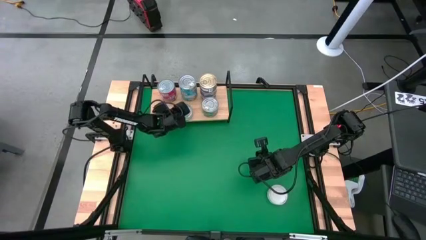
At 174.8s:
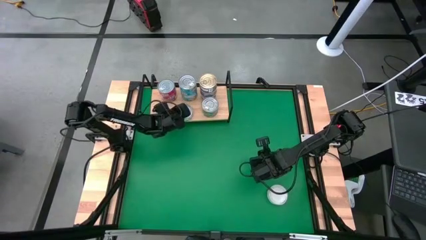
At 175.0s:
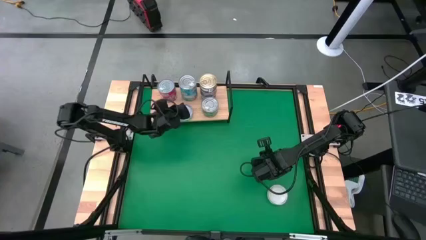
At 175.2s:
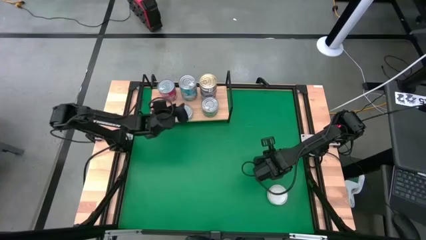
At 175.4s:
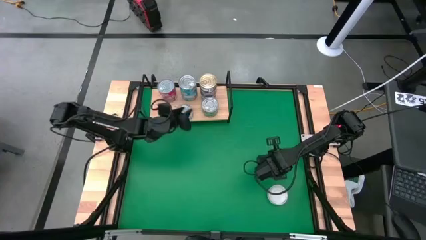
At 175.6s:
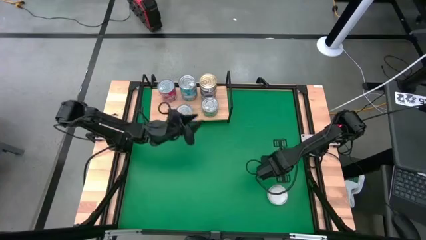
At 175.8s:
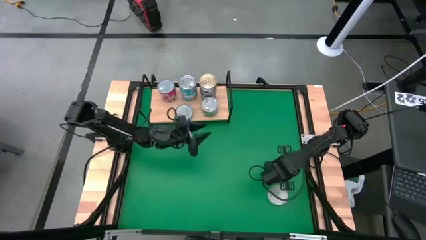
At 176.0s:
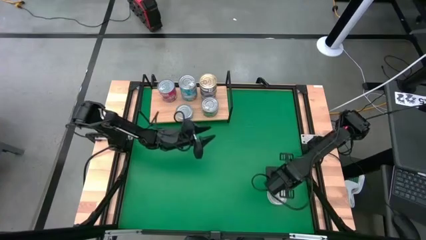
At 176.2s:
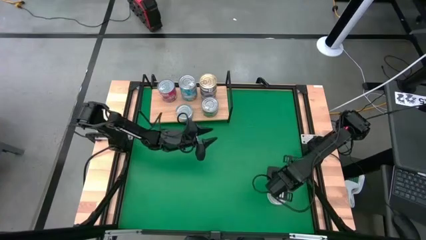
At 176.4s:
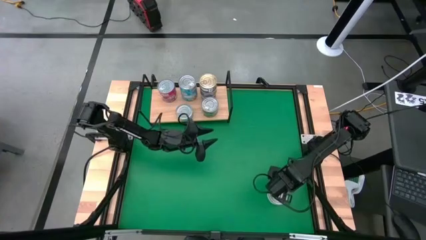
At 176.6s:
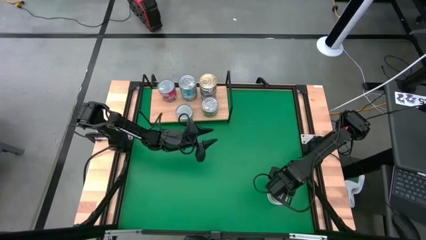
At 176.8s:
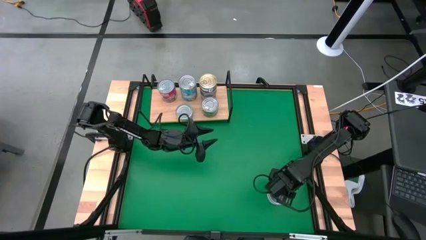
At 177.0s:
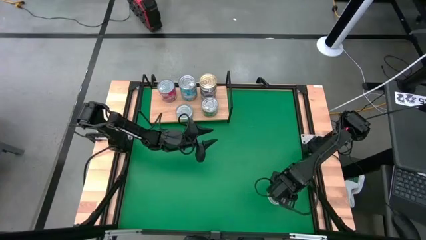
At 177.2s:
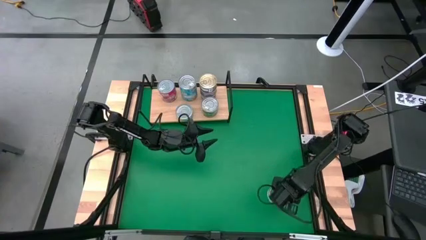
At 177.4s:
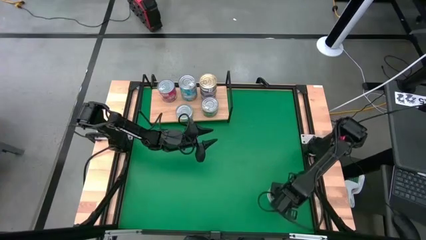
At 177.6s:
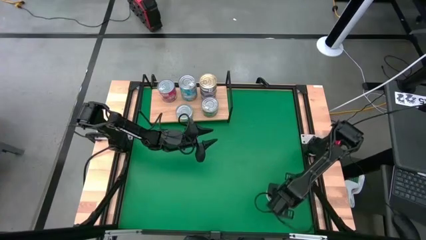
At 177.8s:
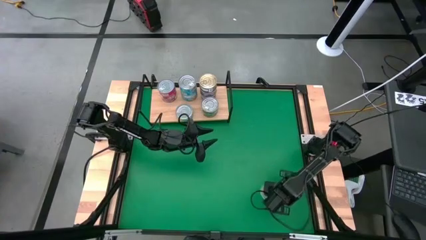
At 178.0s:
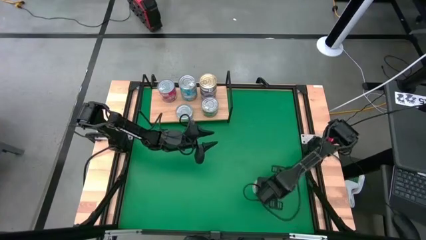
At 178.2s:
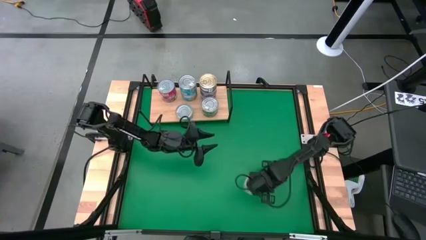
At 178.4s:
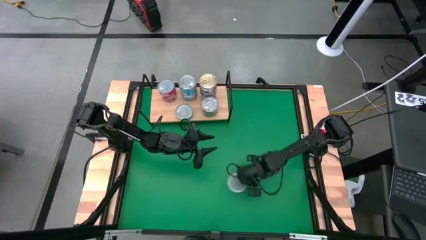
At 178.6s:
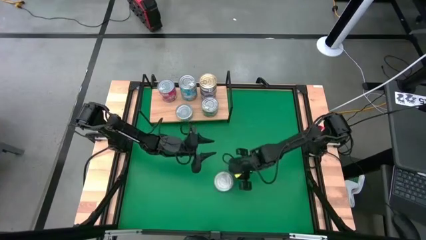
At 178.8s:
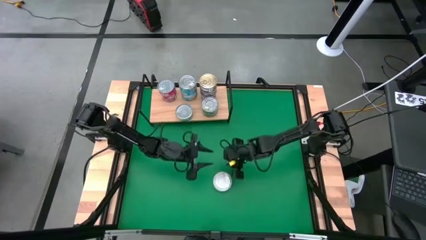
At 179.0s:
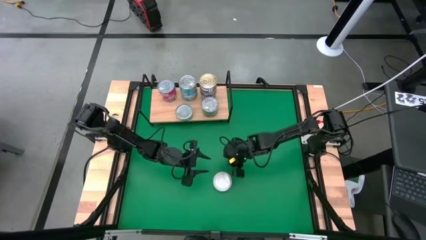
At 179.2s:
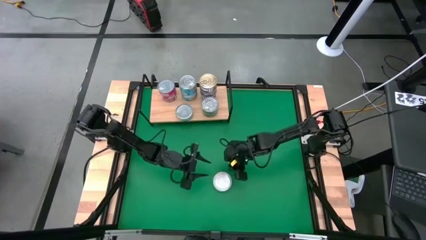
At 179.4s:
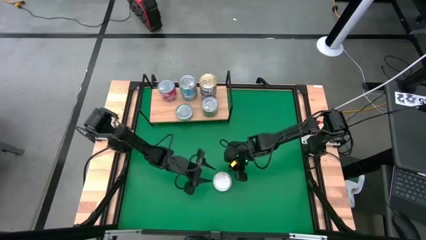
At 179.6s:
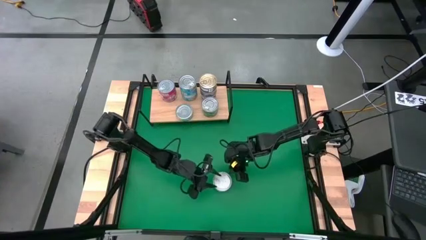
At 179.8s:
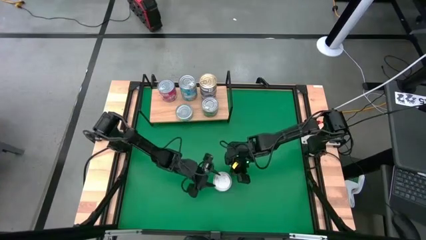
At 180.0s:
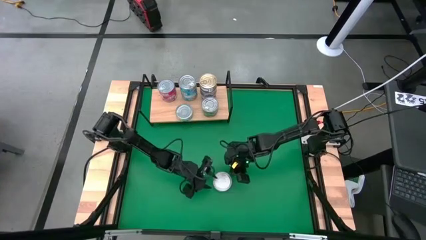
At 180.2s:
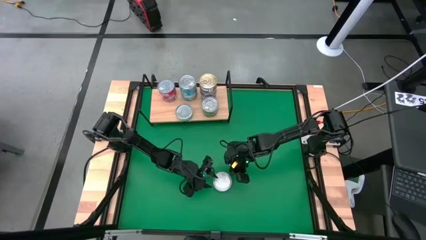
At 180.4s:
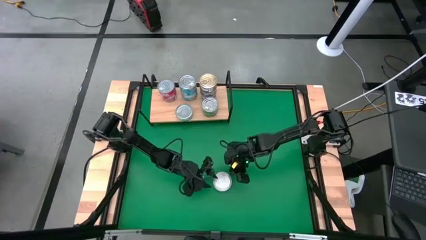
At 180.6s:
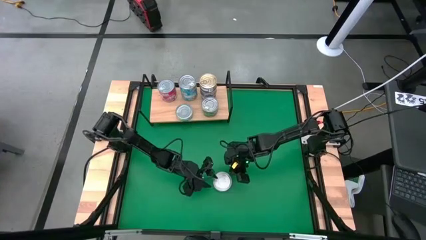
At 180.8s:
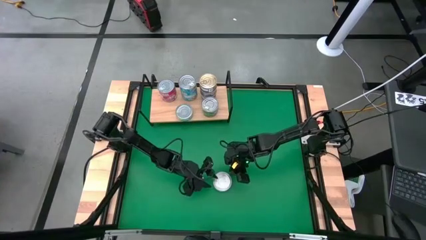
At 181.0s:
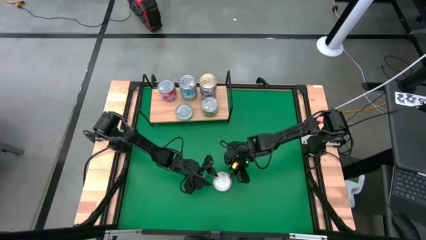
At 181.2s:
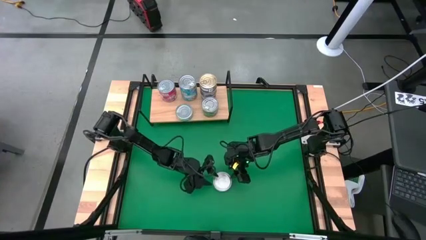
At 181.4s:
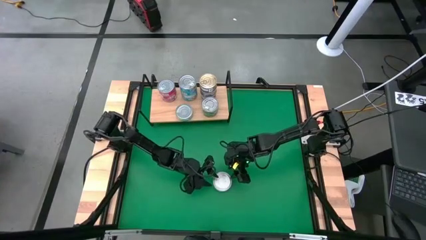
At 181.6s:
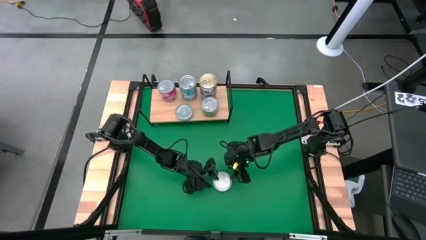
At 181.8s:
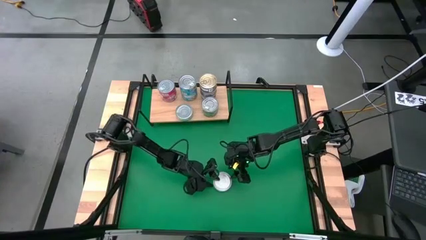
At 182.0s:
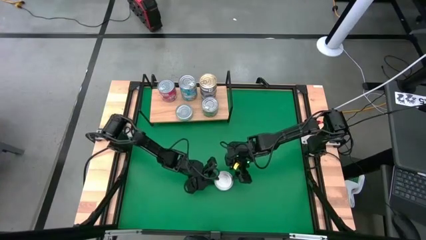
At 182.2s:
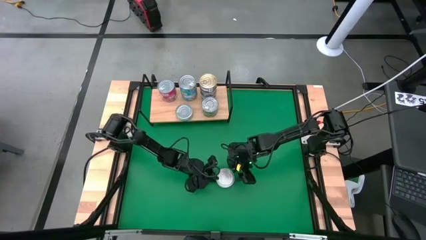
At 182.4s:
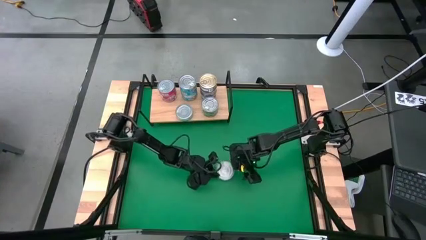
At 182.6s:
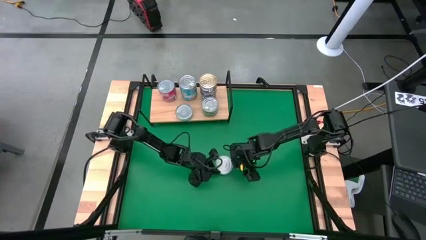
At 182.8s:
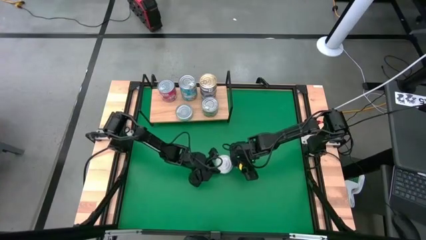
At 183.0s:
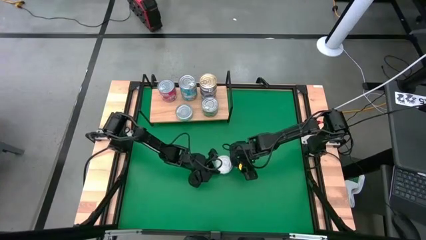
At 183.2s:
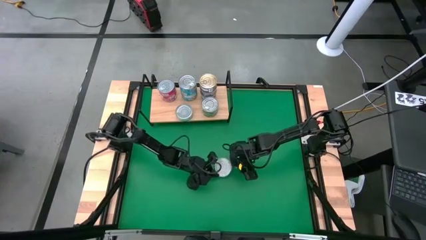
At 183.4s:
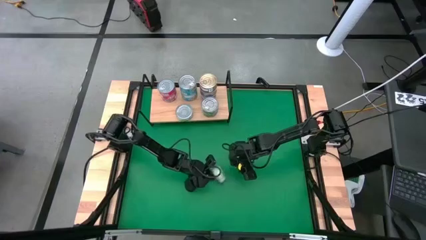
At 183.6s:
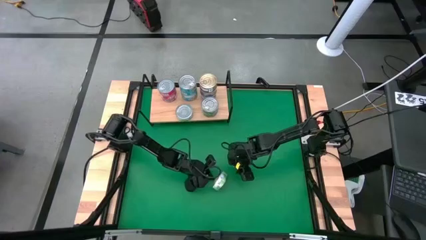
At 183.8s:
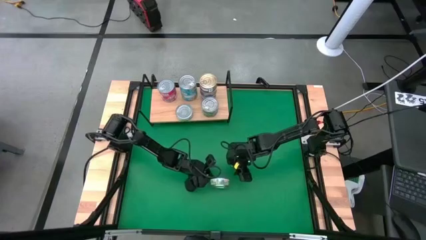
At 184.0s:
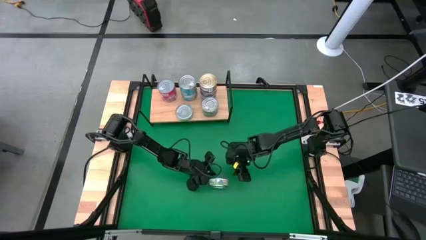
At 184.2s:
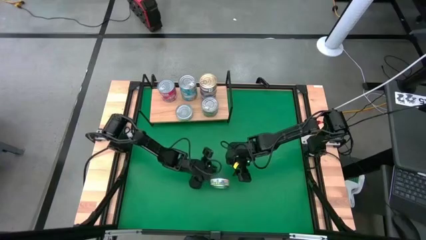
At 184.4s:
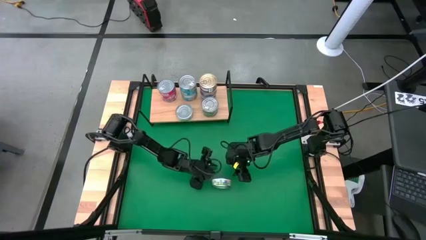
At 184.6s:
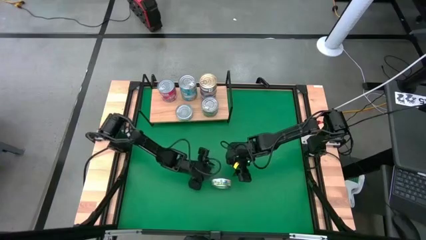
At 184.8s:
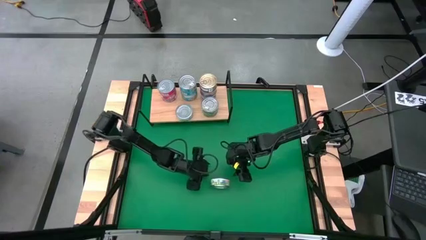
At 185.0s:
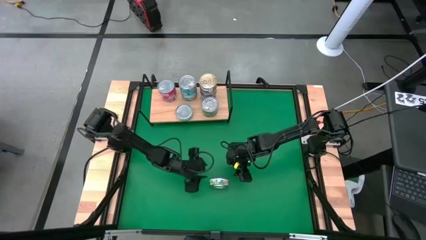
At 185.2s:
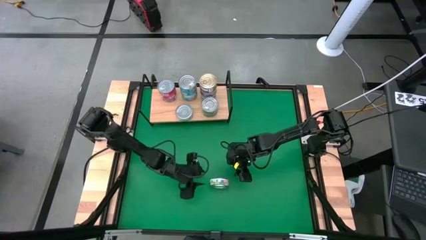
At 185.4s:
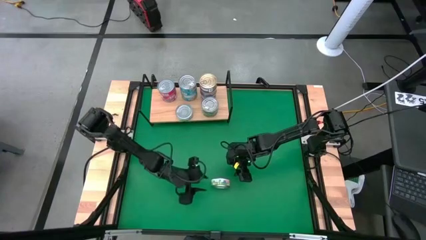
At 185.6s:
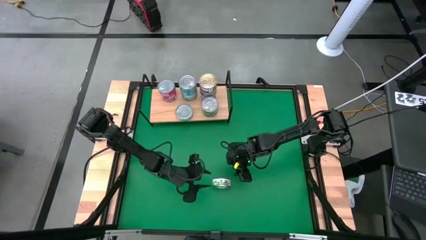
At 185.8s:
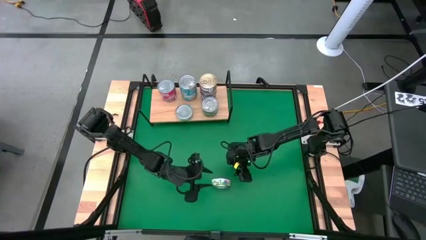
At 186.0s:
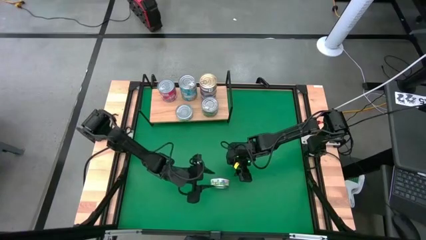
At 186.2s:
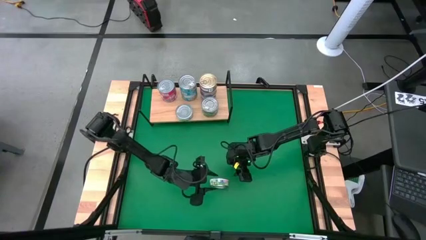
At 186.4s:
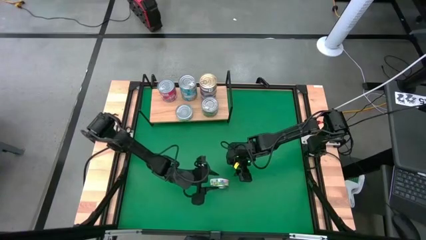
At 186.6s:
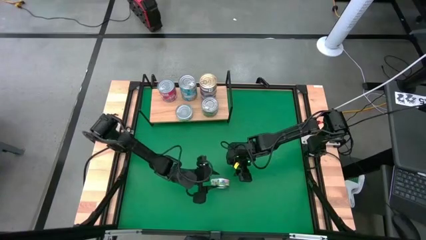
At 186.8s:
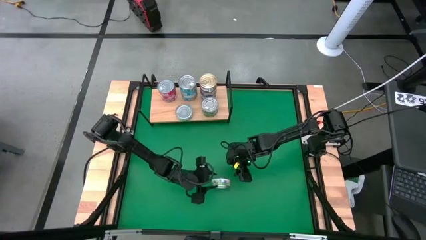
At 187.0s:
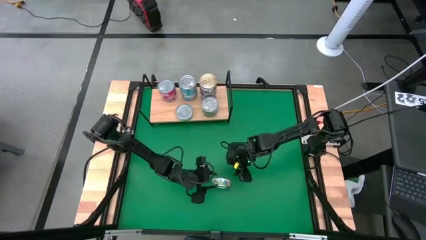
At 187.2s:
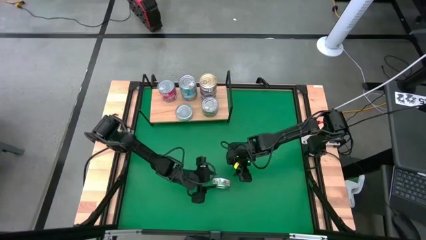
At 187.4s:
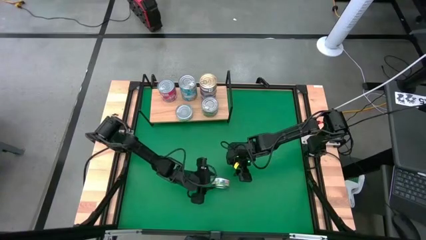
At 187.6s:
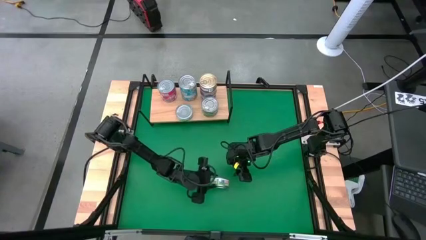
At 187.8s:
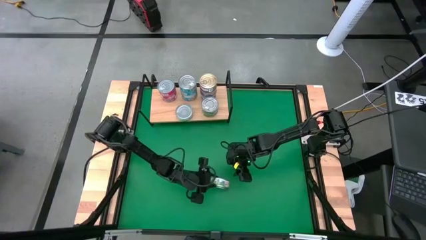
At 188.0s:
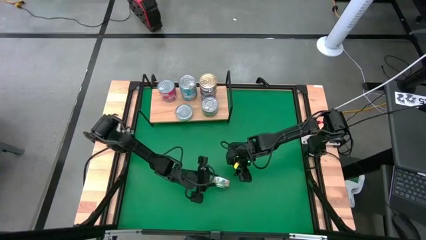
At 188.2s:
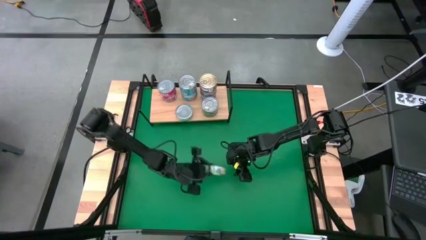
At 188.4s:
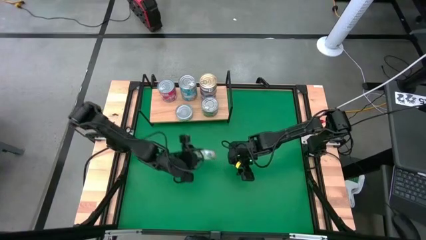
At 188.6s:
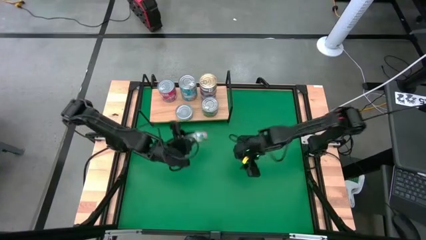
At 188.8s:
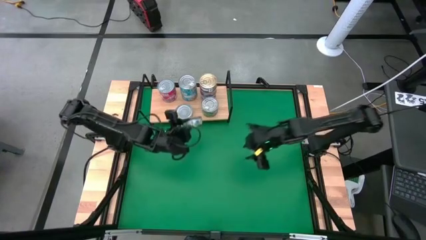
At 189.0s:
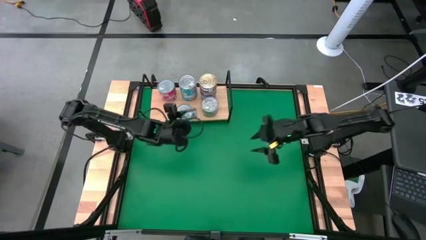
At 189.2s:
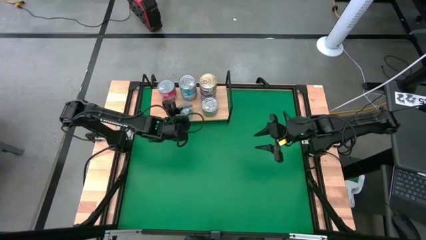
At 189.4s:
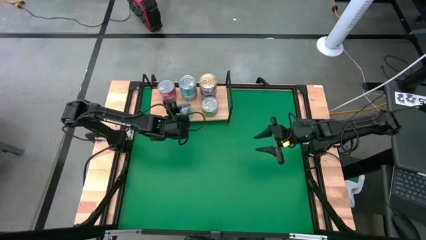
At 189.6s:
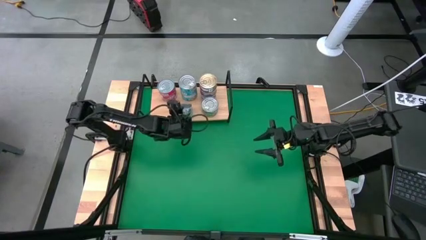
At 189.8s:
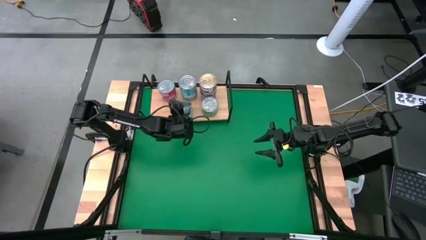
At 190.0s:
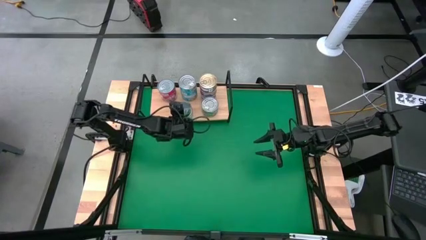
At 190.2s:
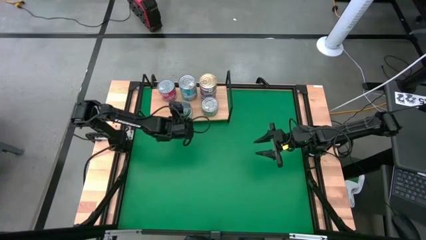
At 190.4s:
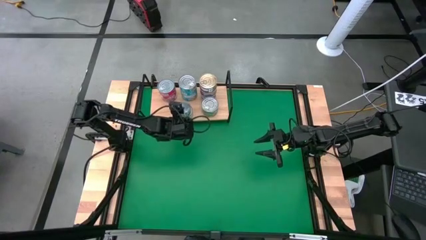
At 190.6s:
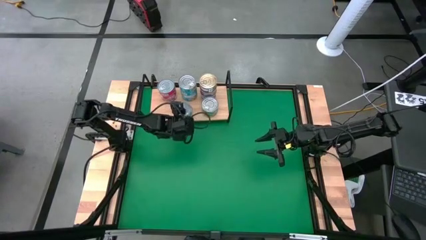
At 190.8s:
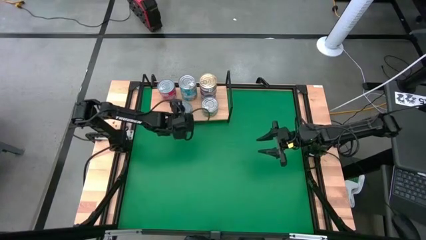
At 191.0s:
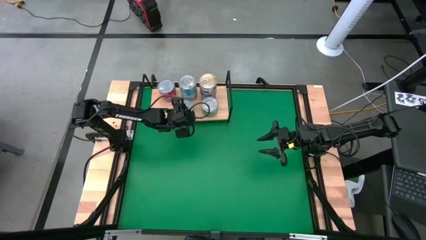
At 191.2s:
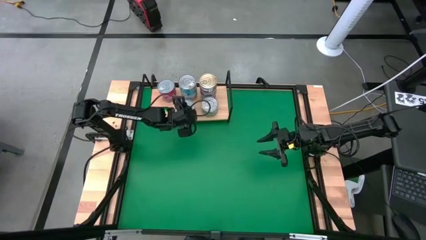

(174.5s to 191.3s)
Task: Stack canned seafood by type on shelf
Stack the green white tuna can on top of the other green white tuna can on the shelf

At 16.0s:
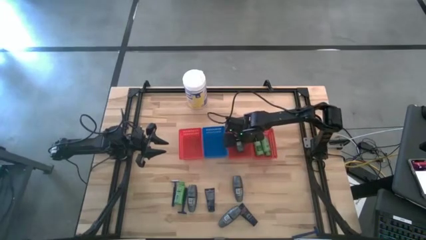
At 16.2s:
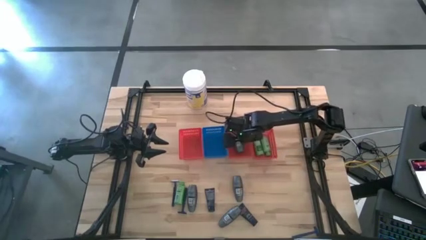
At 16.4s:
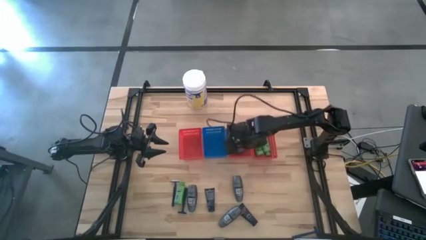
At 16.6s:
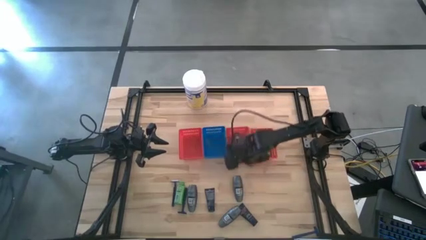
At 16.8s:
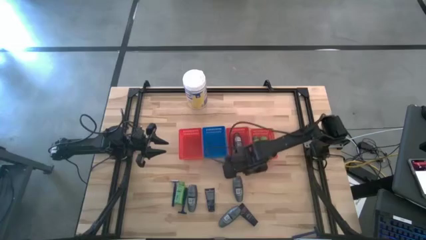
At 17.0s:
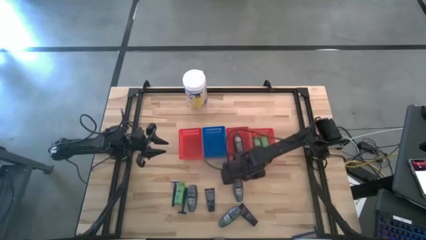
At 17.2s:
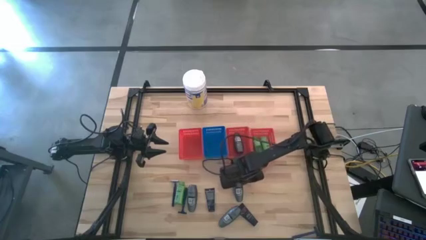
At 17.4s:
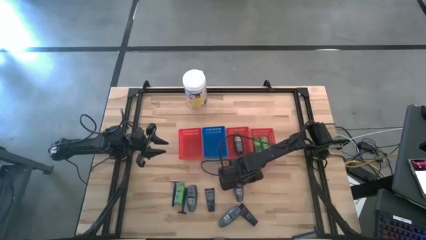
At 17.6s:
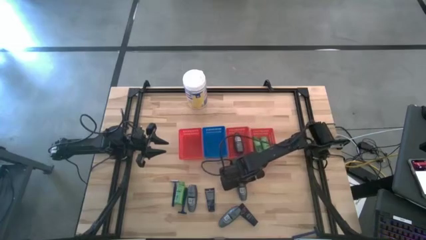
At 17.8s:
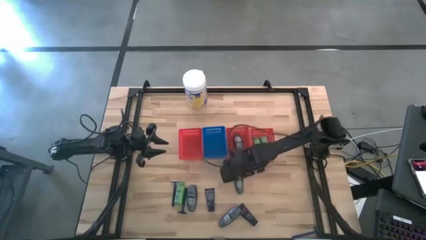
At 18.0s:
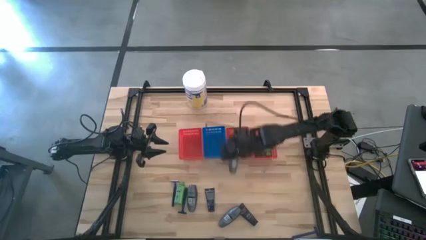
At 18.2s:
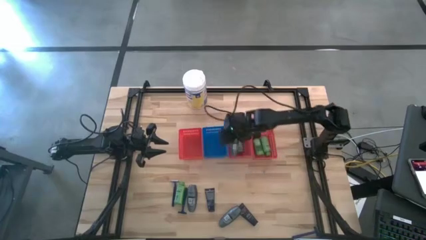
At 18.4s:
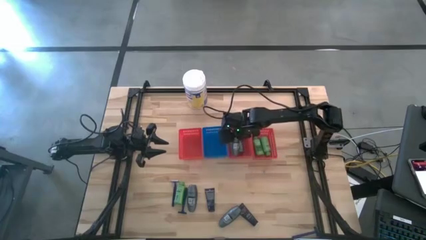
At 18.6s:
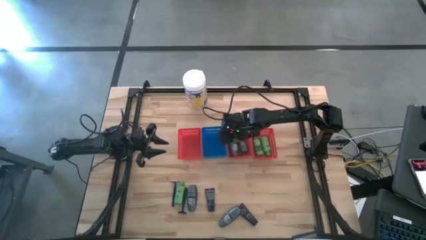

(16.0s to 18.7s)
Task: Pick & Place Travel size toiletries
Put the top right gray deodorant into the middle red bin
